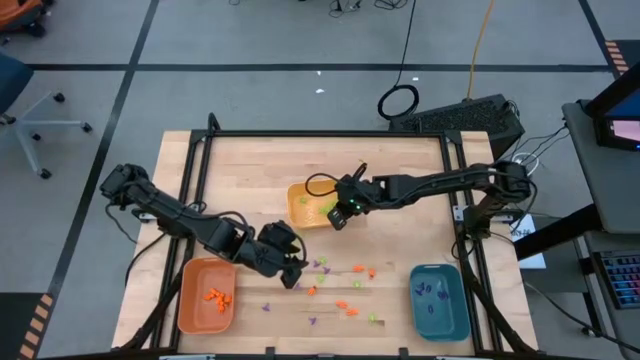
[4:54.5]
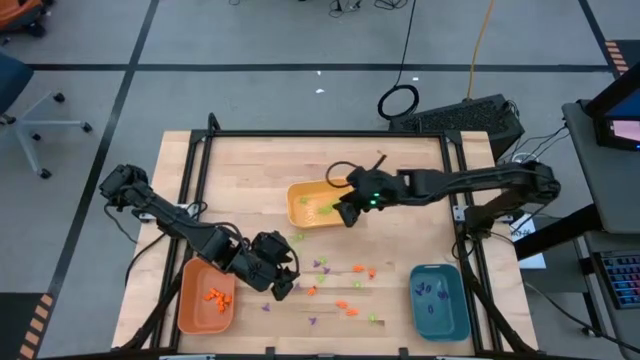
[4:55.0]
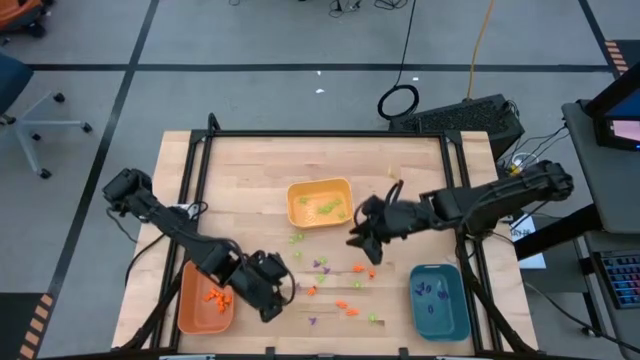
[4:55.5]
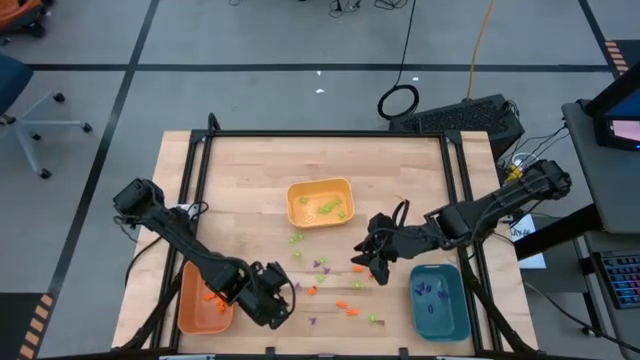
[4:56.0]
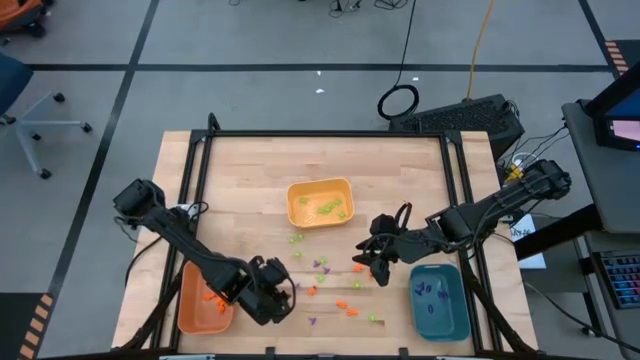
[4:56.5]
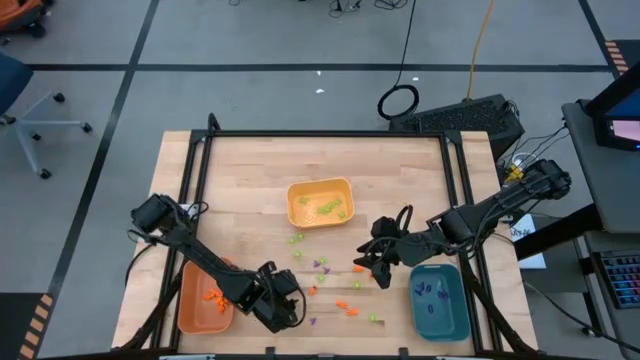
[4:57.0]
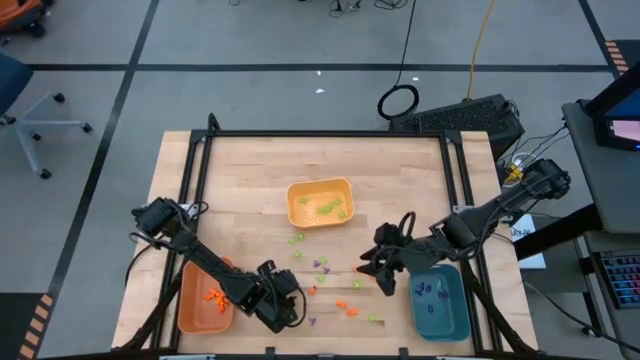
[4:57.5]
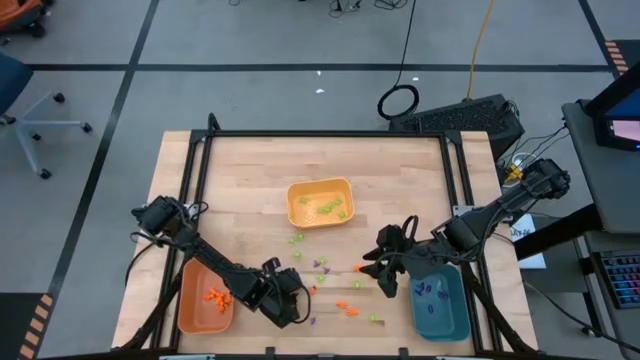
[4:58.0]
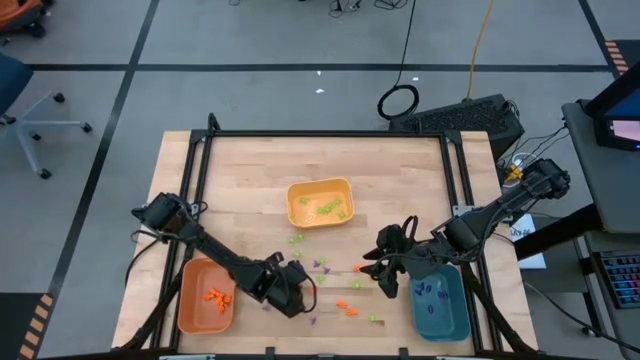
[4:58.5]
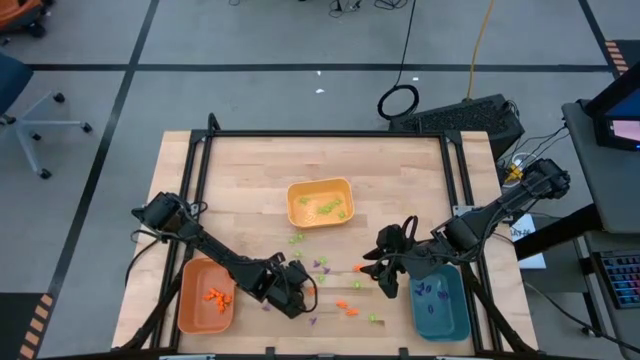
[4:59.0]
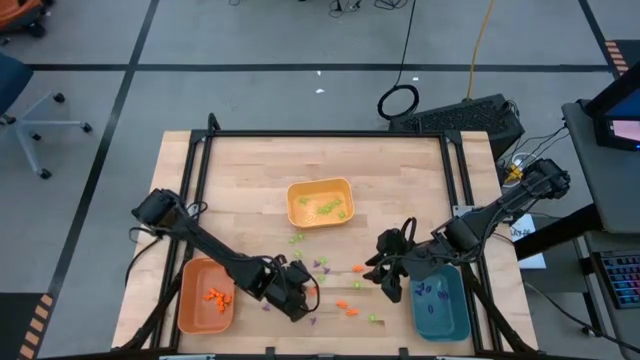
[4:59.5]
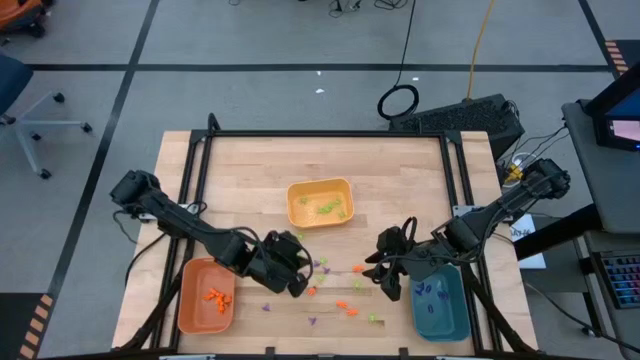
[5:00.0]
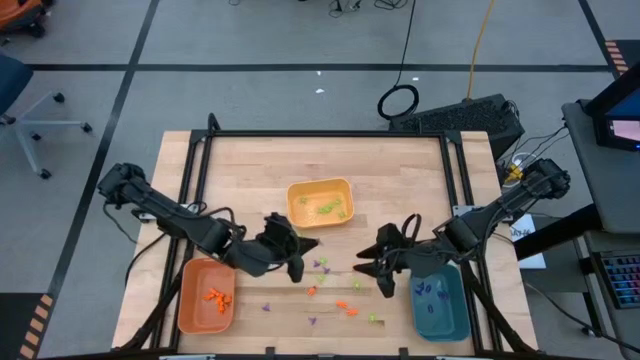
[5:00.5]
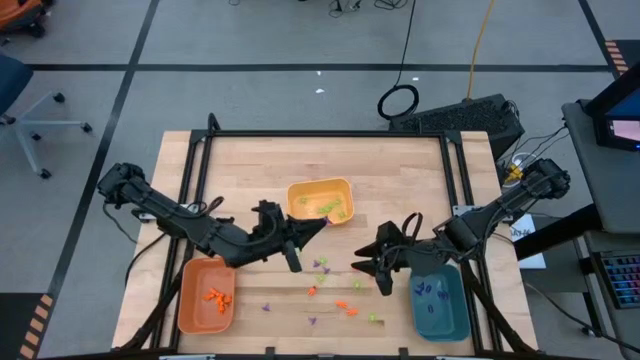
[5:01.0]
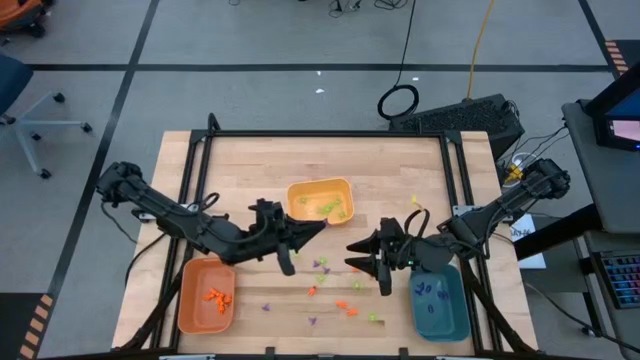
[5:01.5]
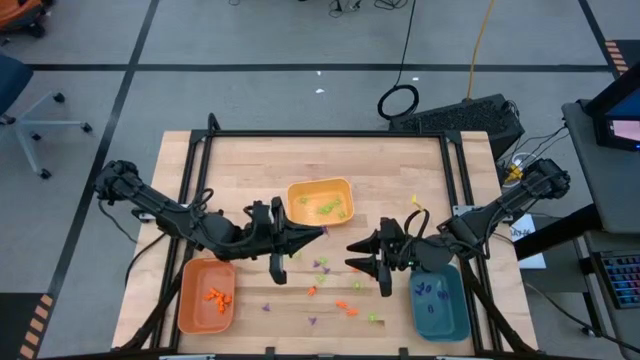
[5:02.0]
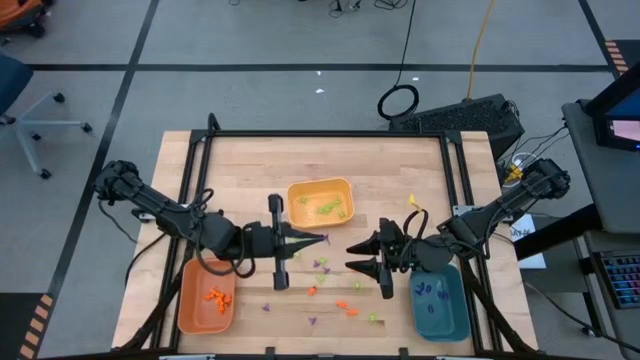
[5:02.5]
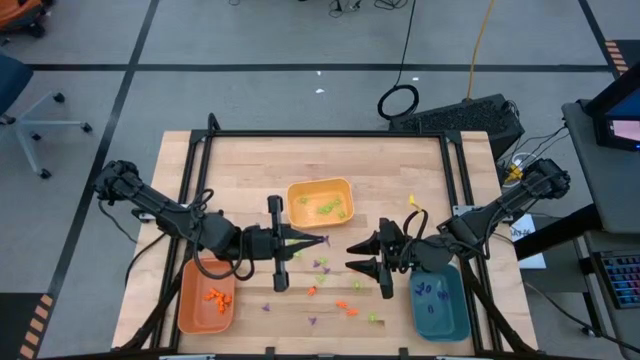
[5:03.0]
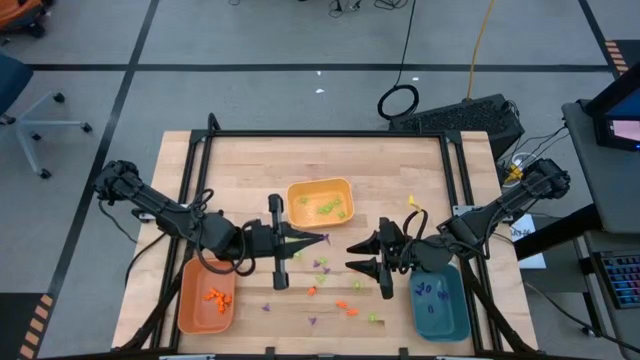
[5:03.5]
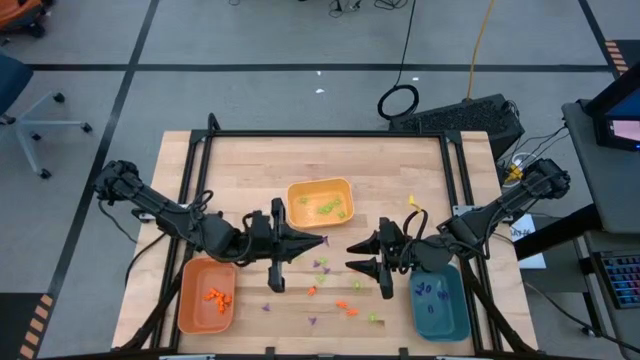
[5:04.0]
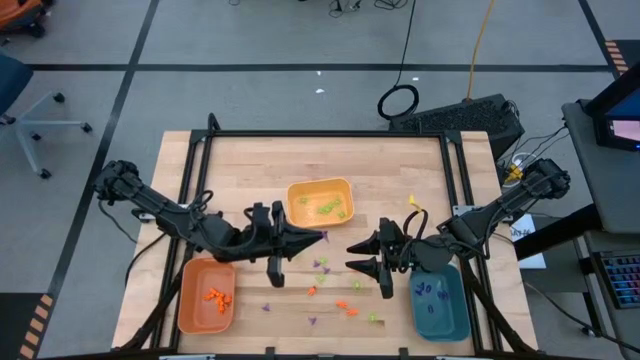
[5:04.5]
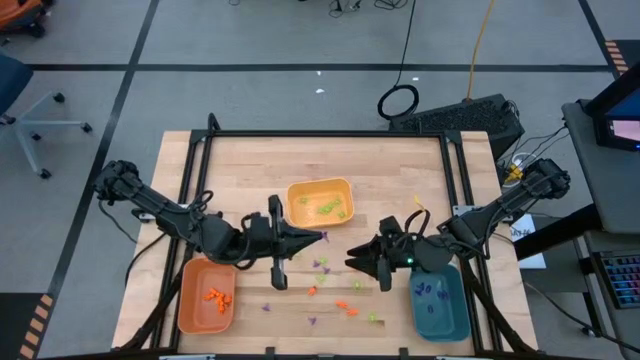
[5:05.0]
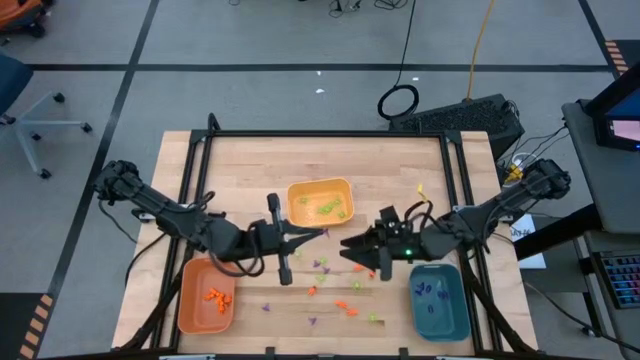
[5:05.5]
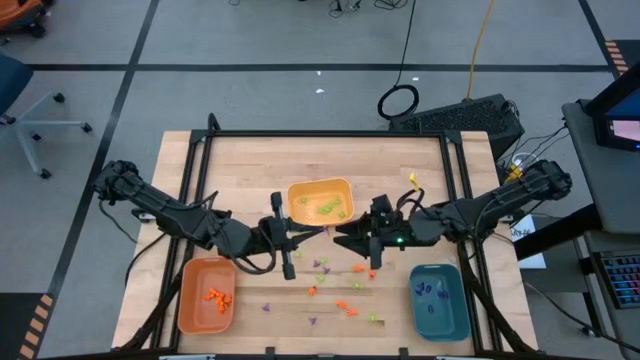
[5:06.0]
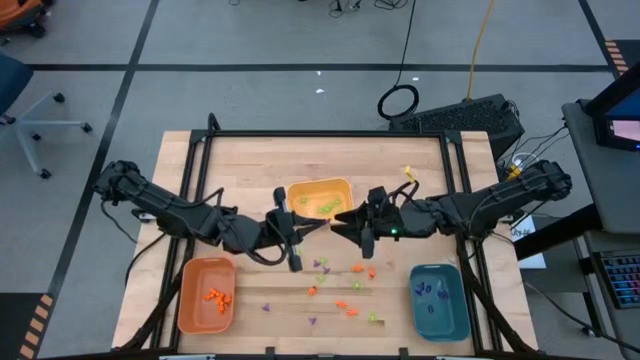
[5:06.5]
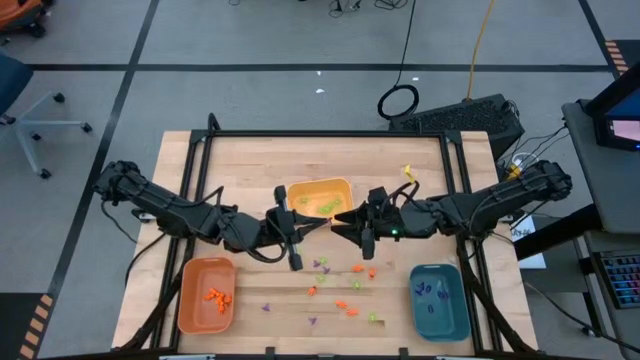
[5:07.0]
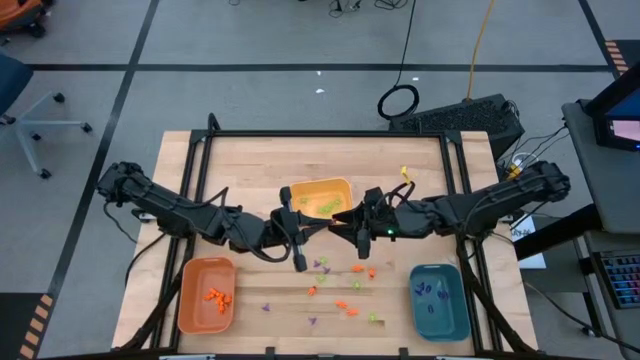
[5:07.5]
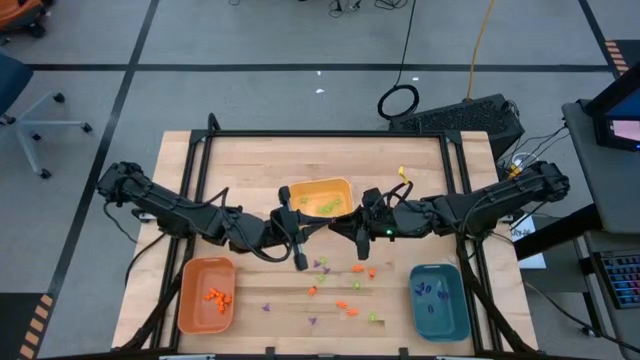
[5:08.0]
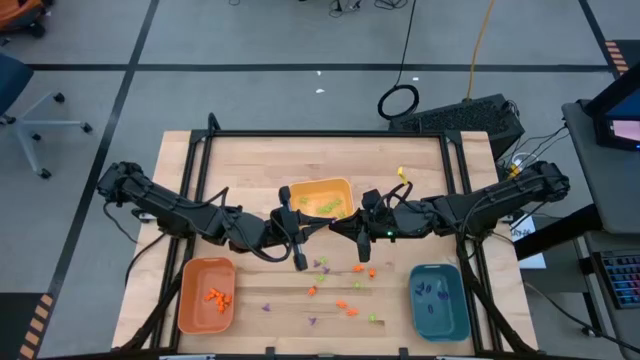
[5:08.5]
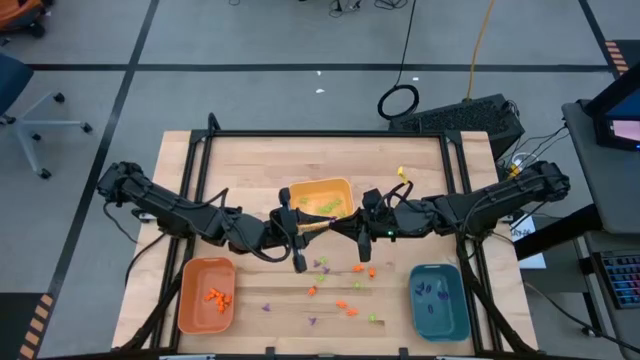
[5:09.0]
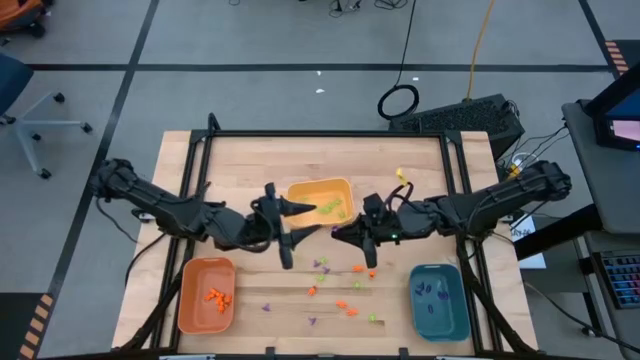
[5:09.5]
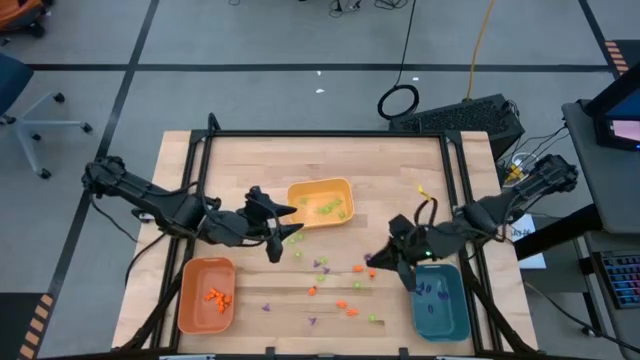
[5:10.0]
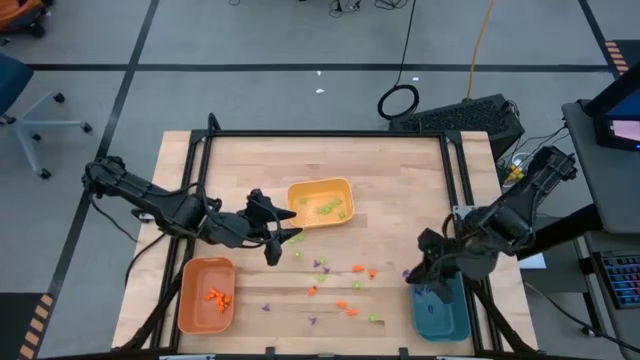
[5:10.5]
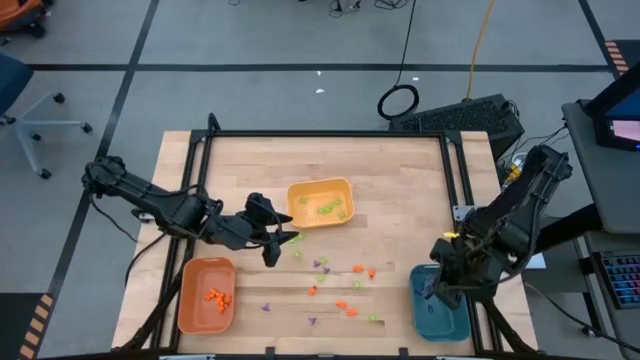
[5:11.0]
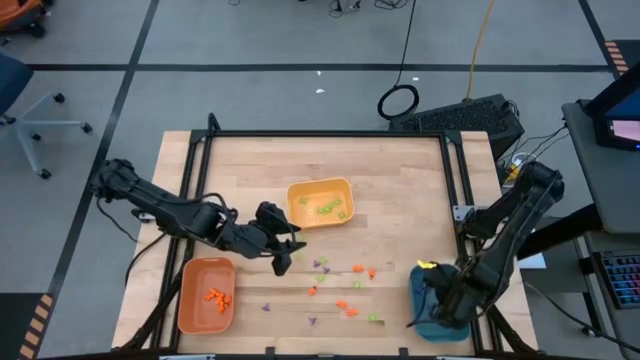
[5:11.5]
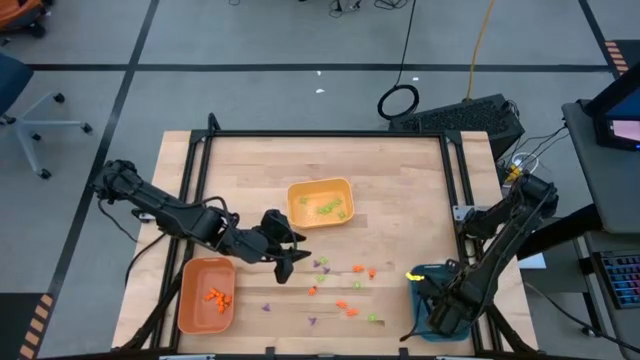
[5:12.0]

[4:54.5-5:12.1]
Task: Sort Halloween decoration
Put the violet witch hat toy into the blue bin

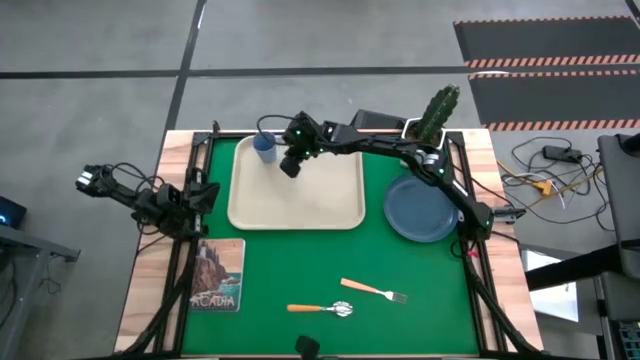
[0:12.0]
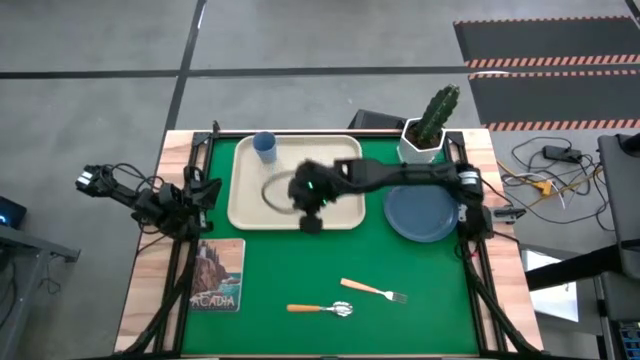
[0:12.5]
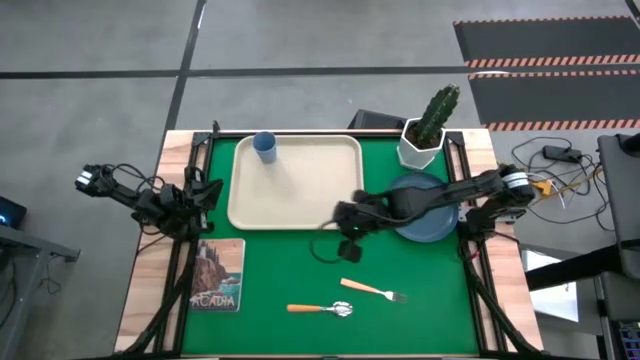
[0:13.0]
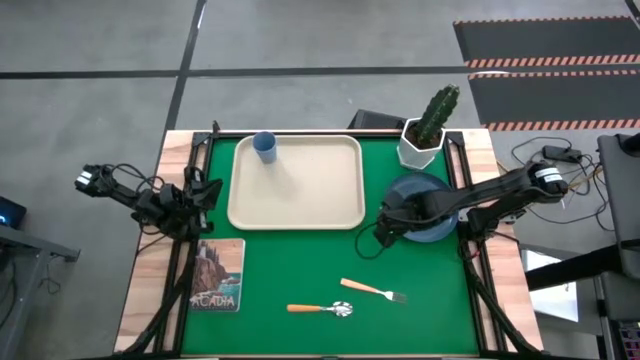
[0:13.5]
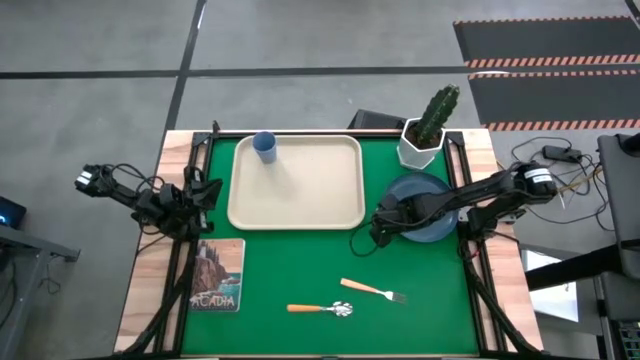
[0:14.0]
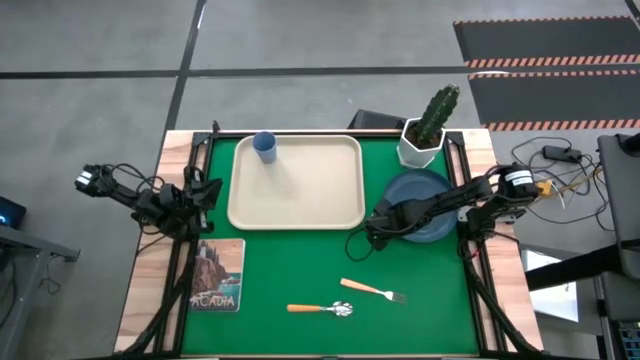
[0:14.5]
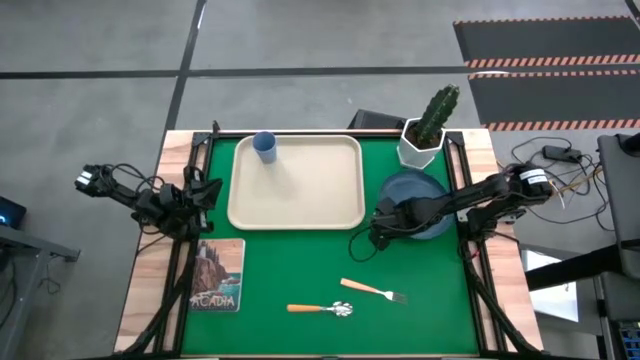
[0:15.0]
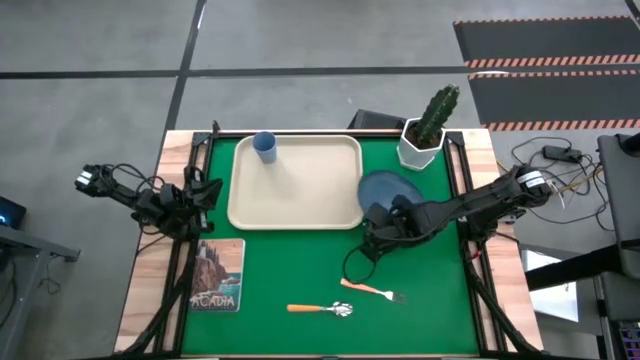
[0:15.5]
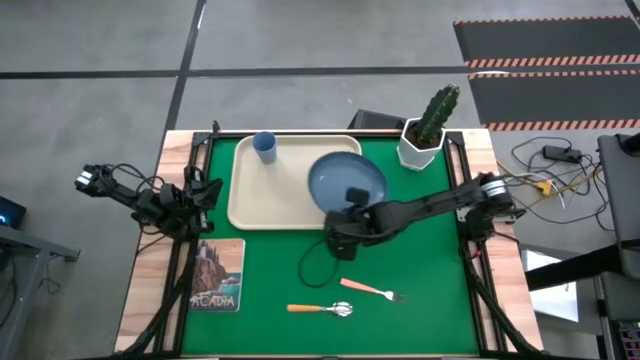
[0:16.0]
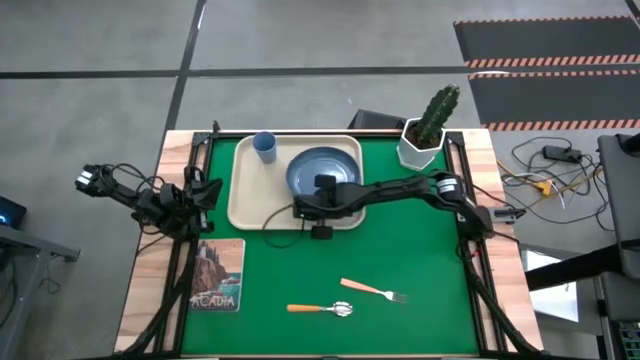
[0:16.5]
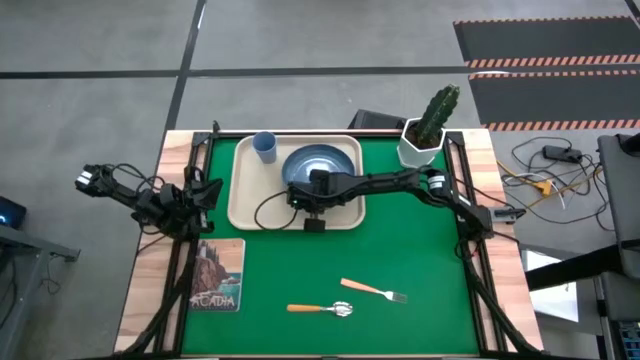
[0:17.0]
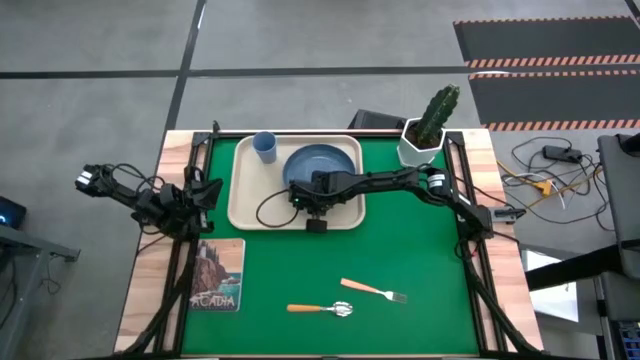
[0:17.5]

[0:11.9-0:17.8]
Task: Pick and place plate/cup/fork/spoon on tray
Put the dark blue plate on the white tray to the right of the blue cup
